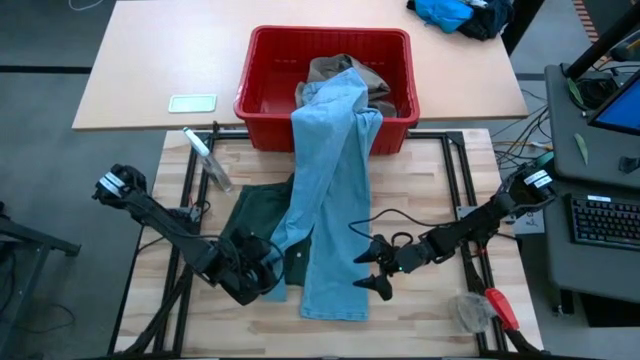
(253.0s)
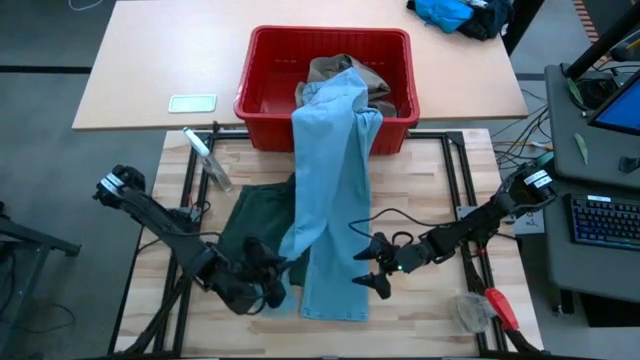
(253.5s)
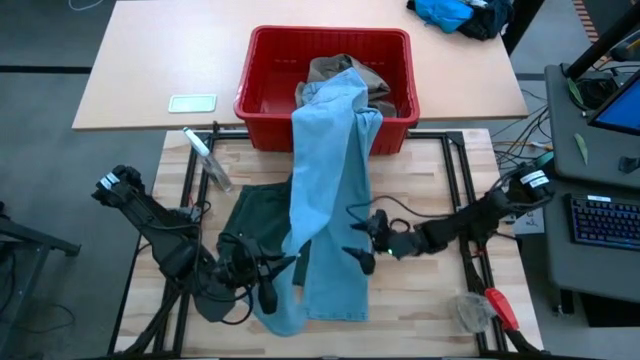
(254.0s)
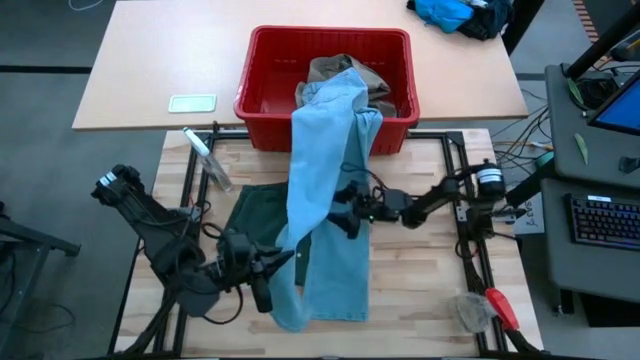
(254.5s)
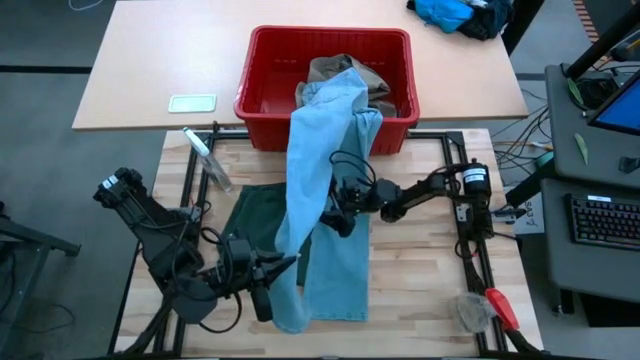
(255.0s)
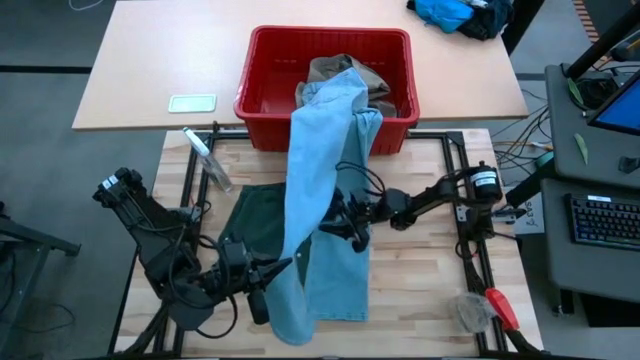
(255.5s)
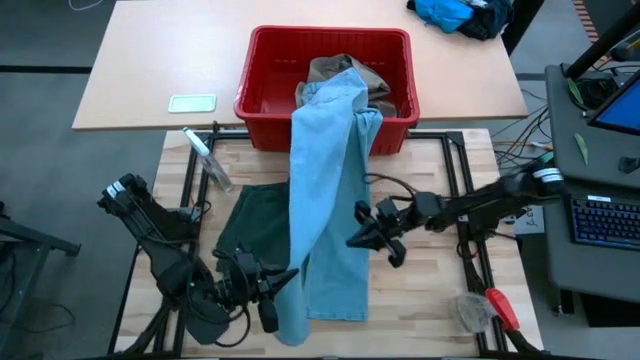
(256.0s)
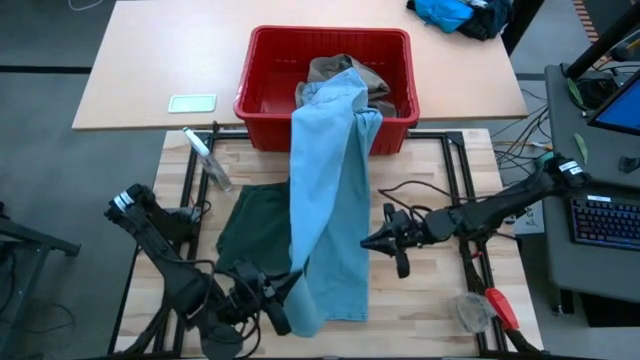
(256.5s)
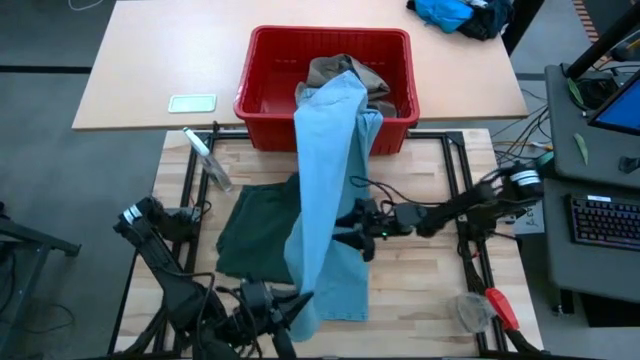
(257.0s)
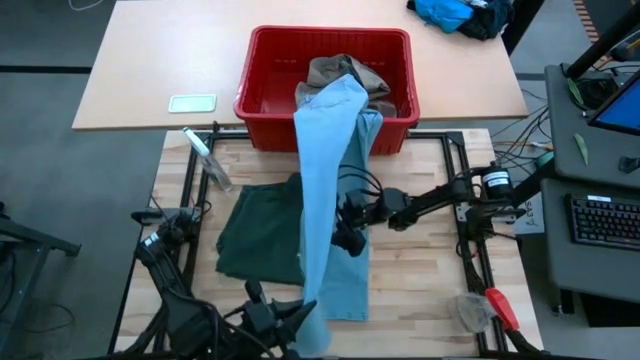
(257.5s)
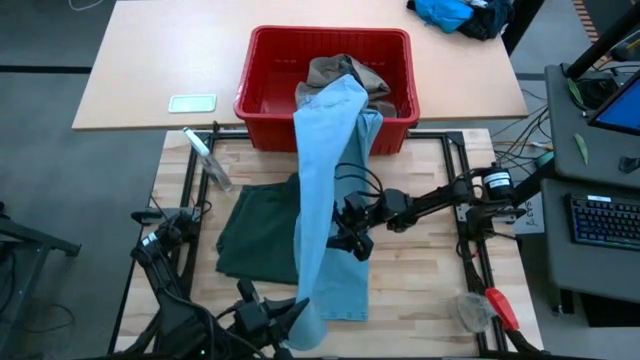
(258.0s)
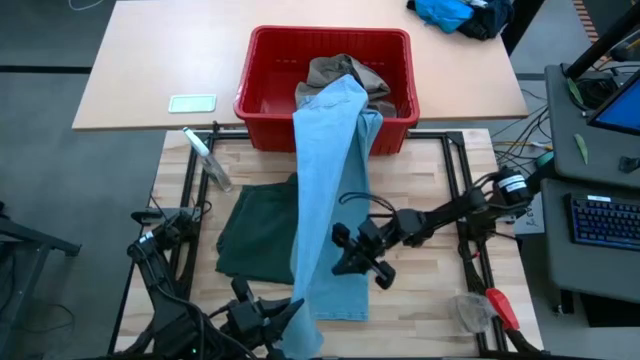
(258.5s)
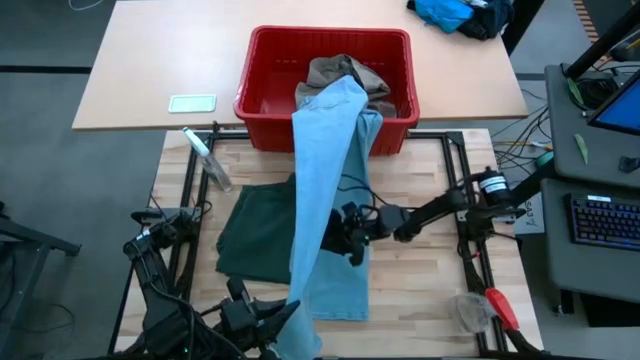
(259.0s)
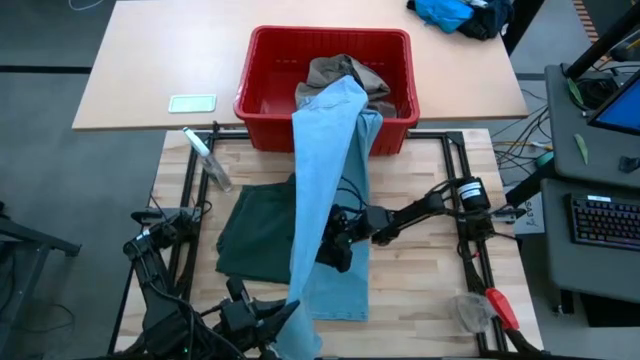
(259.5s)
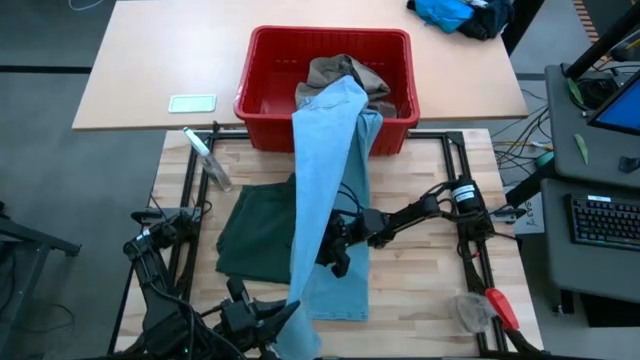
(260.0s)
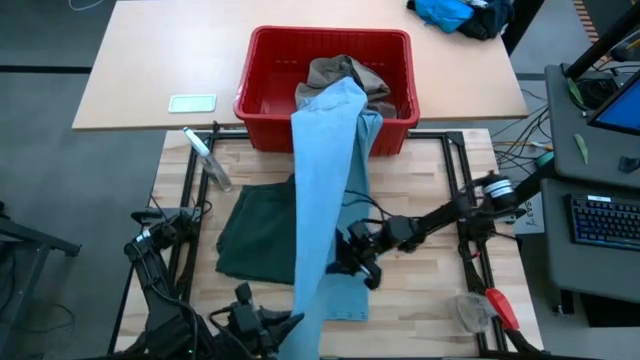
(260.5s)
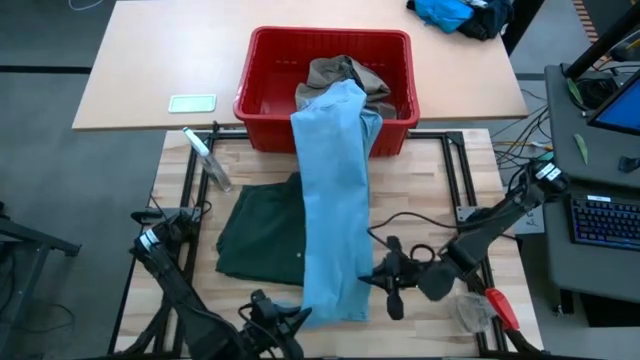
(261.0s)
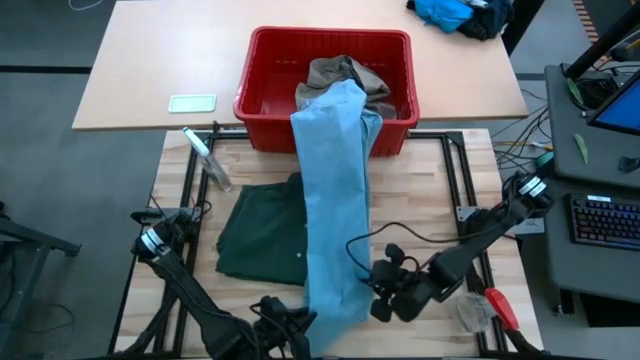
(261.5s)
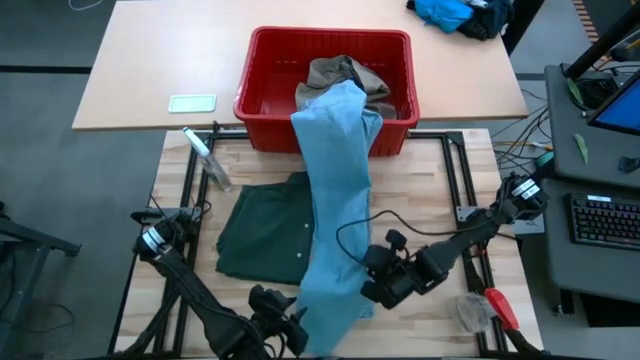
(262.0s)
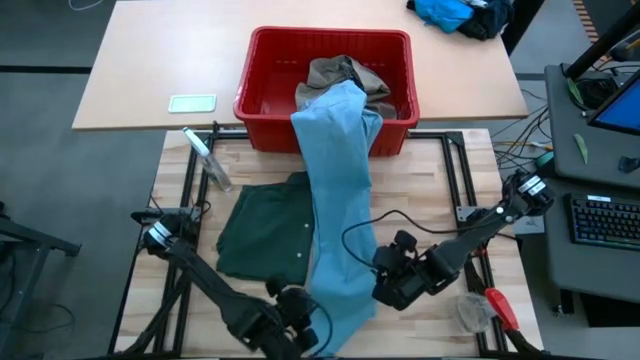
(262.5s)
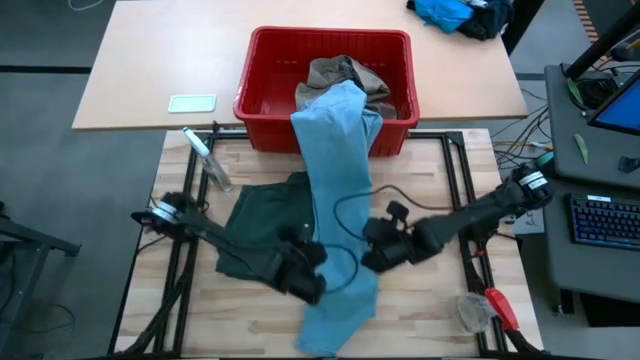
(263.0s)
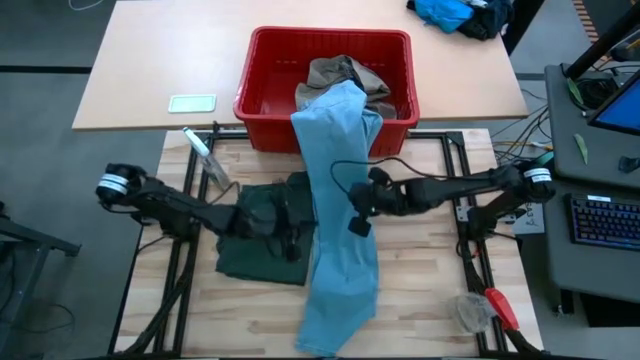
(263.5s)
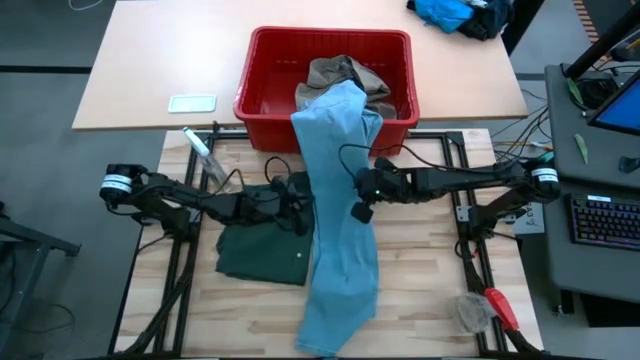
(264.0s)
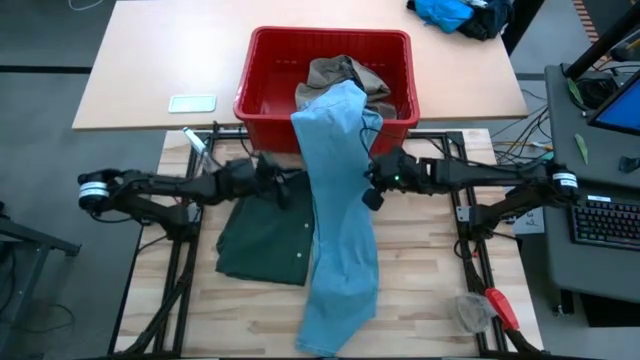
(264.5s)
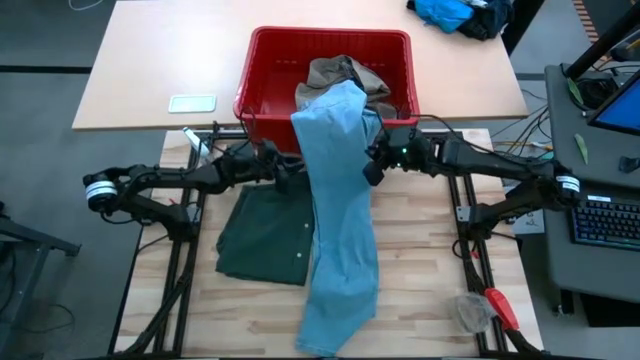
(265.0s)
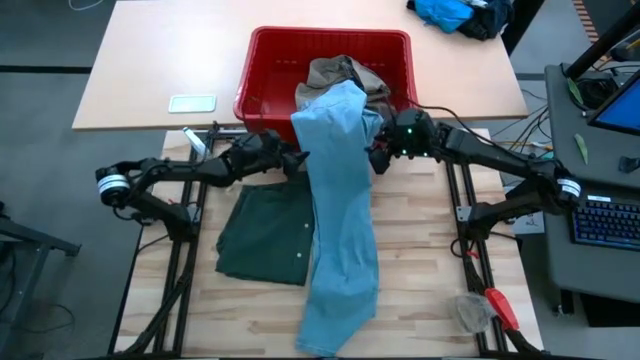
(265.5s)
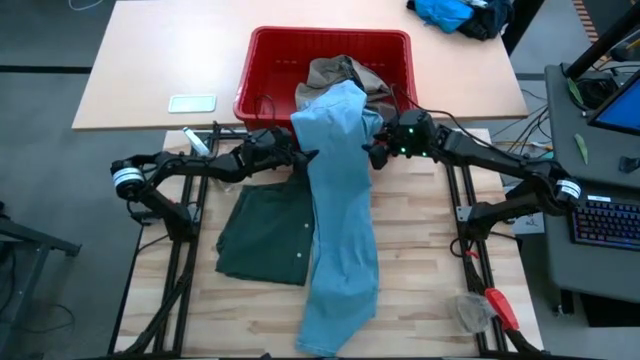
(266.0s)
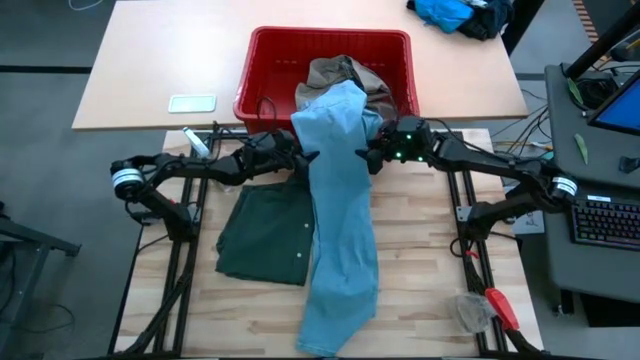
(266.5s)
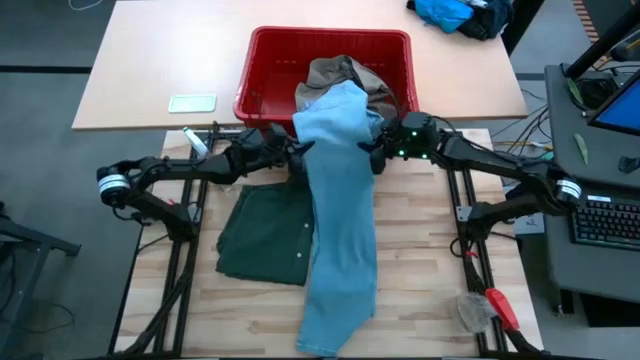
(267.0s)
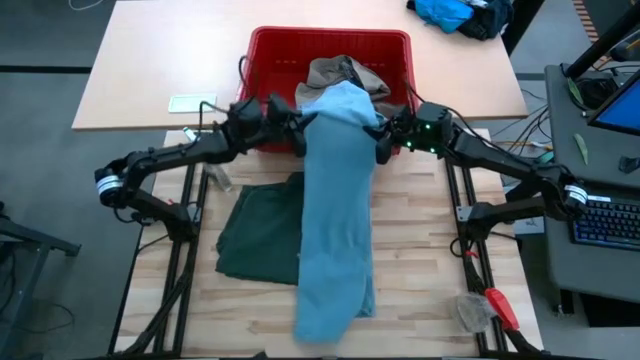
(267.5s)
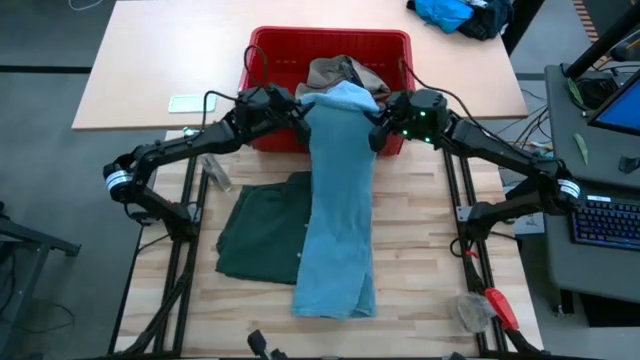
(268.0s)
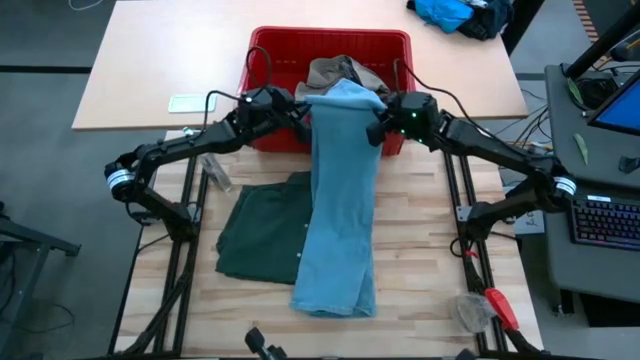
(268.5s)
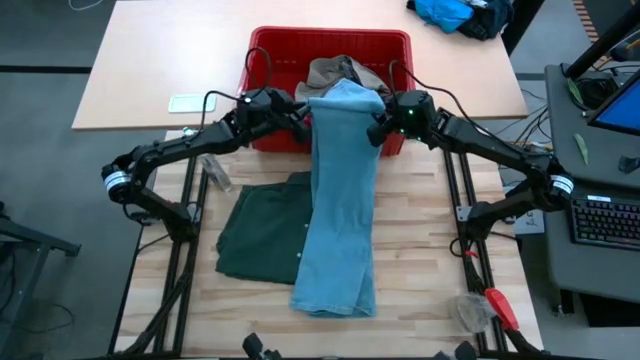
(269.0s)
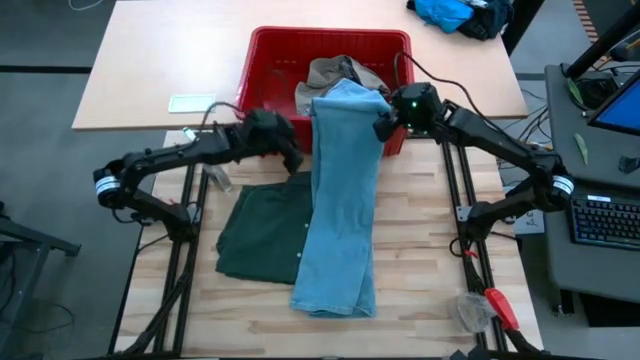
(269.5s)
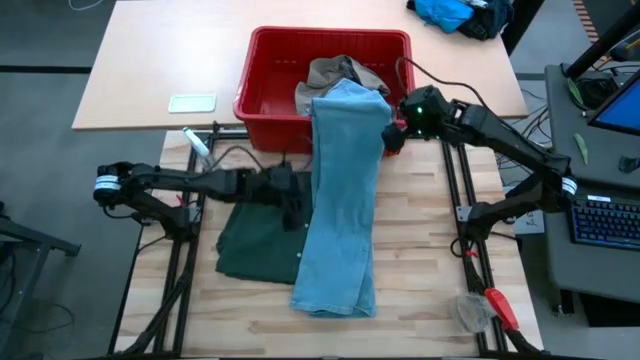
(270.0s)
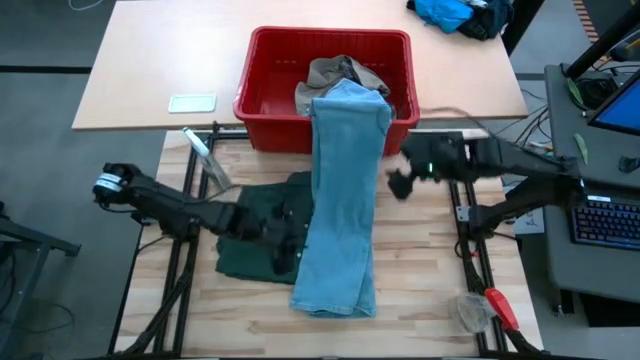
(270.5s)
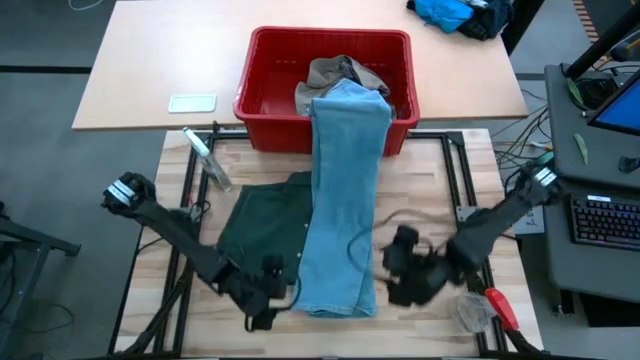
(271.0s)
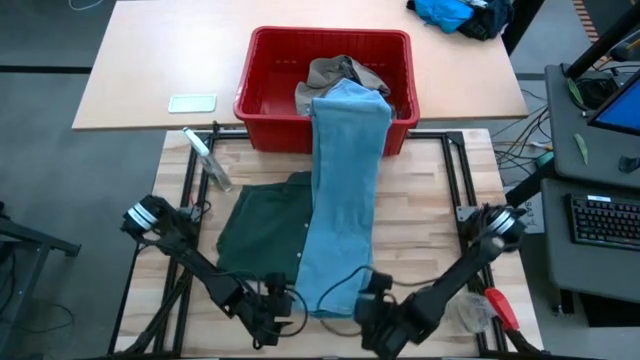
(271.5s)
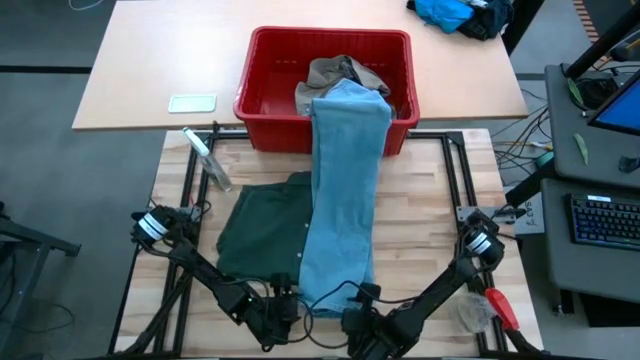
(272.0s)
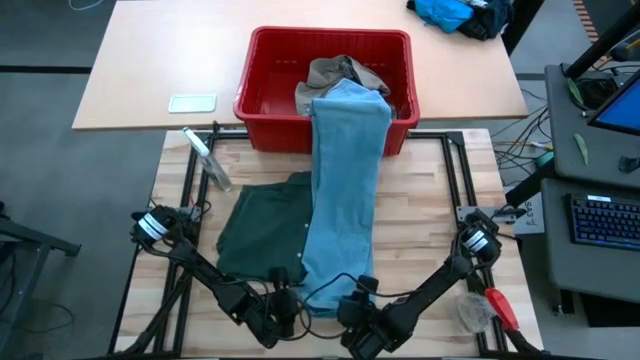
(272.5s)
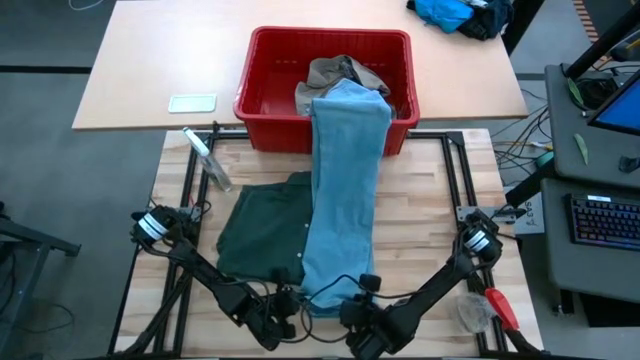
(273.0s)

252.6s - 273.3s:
Task: Fold Laundry from Bin
Fold the blue jeans
